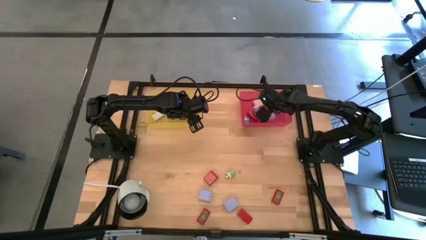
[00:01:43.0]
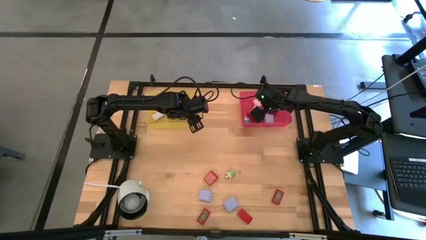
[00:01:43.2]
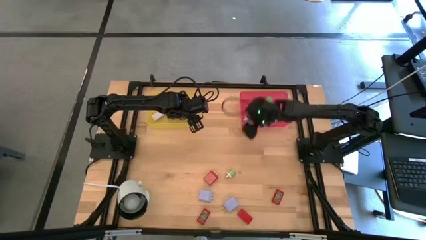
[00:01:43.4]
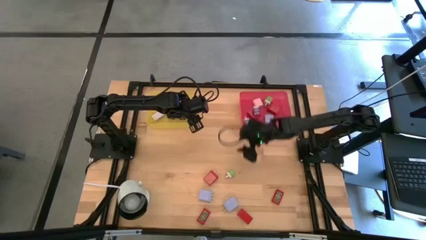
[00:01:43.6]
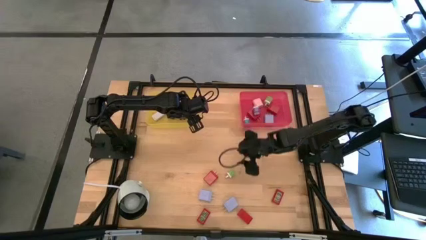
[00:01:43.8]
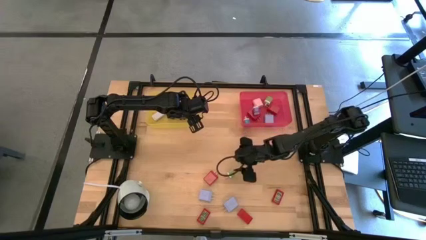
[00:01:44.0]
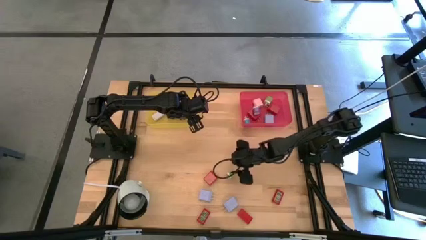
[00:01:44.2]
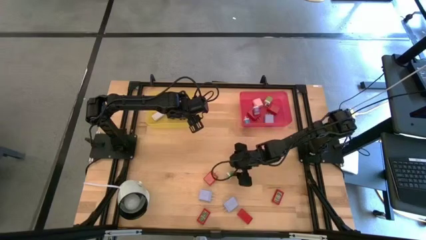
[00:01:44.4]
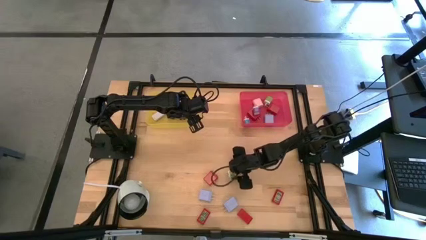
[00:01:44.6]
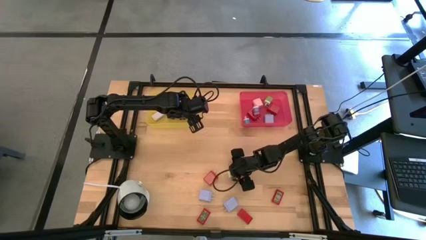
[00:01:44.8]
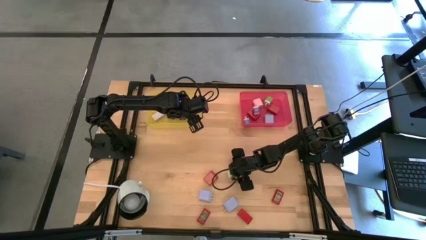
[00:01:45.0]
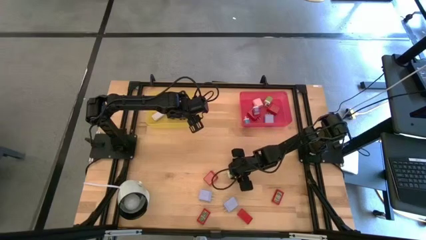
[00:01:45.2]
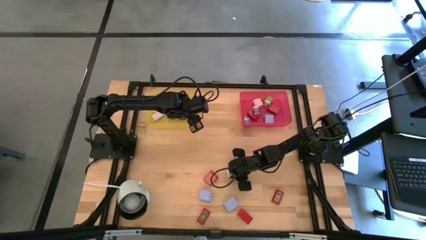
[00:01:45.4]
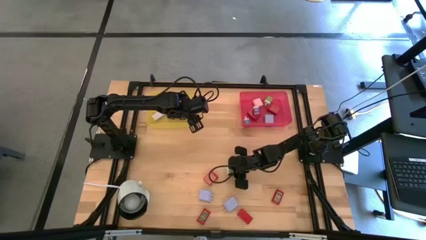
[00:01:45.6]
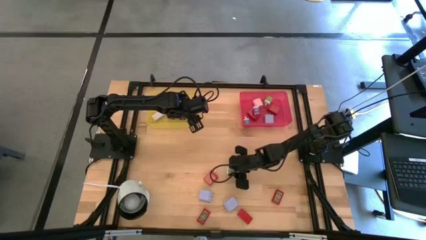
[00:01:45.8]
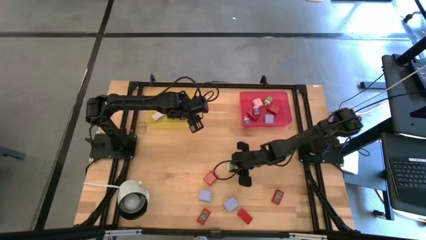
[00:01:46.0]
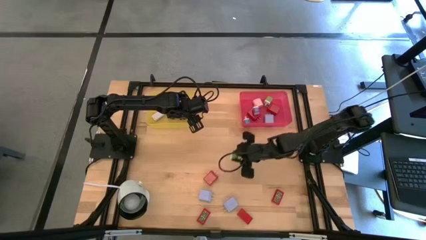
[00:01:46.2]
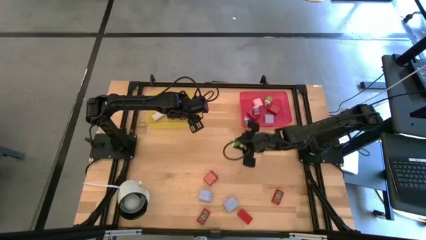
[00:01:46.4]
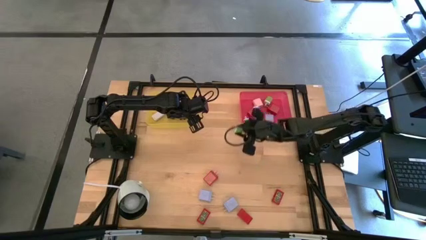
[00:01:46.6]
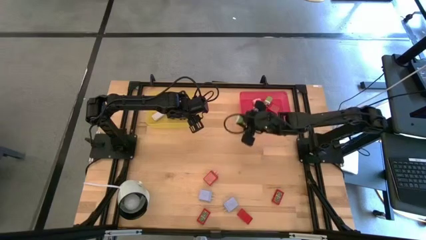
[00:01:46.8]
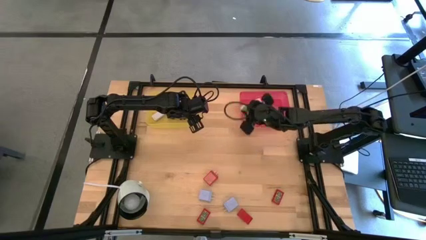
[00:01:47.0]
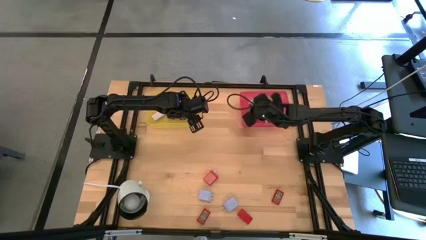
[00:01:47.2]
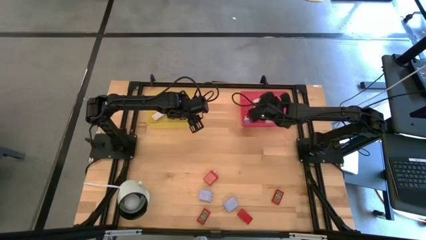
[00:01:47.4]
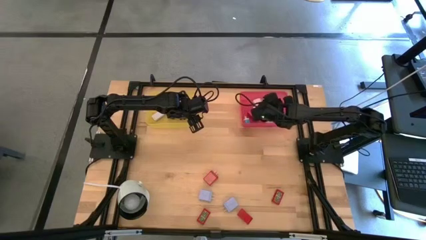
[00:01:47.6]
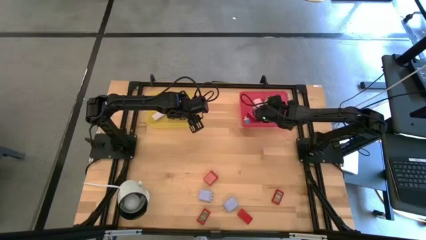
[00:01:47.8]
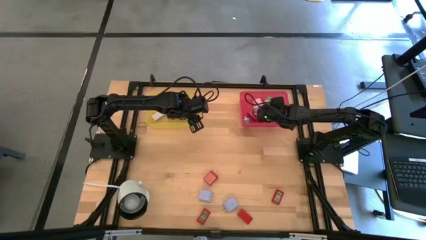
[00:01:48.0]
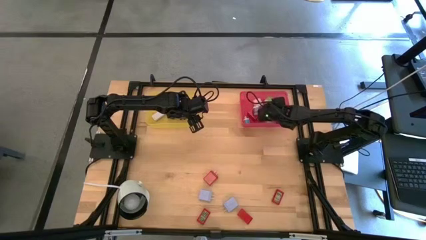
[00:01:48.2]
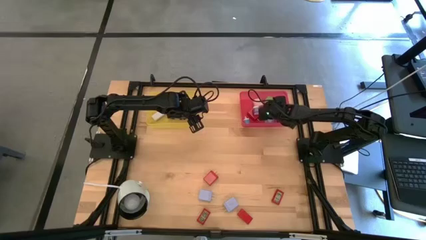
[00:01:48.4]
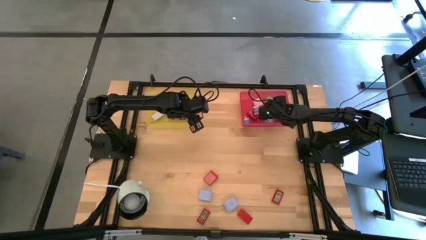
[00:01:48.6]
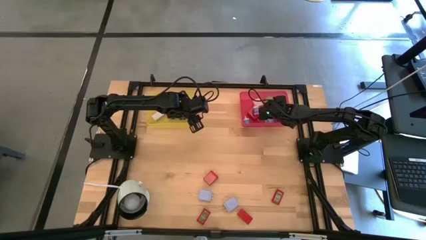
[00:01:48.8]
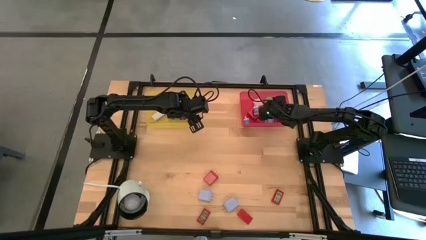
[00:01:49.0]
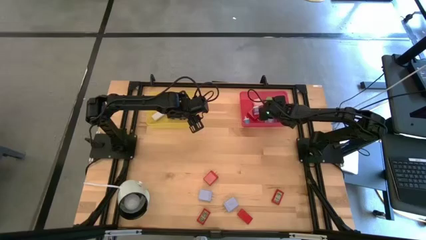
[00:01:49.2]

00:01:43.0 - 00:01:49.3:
Task: Pick & Place Office items
Put the green charger adapter into the red bin

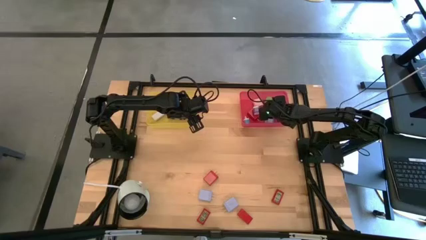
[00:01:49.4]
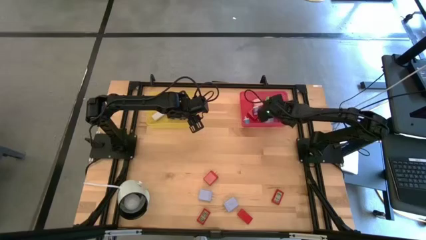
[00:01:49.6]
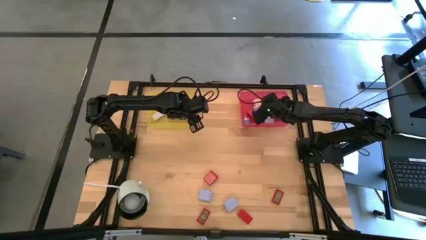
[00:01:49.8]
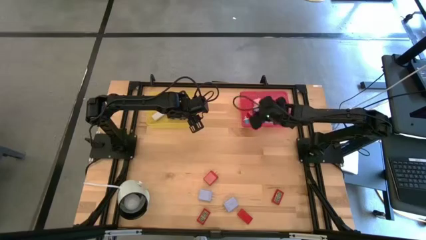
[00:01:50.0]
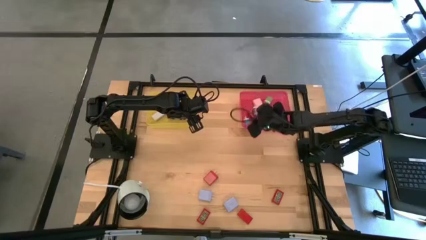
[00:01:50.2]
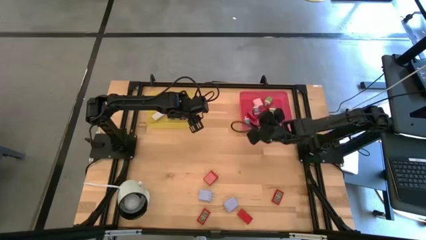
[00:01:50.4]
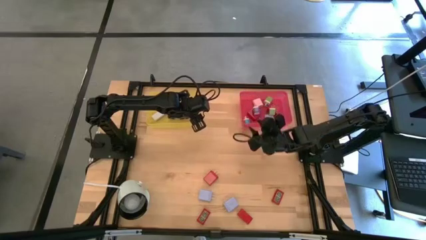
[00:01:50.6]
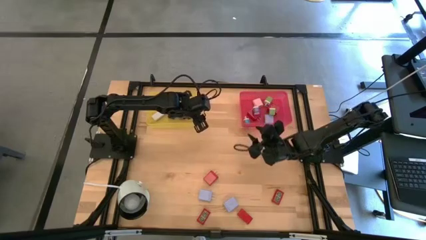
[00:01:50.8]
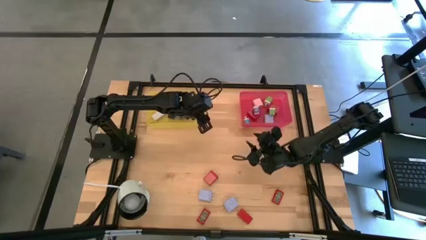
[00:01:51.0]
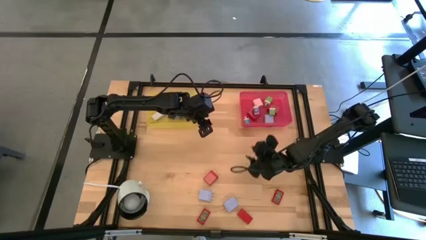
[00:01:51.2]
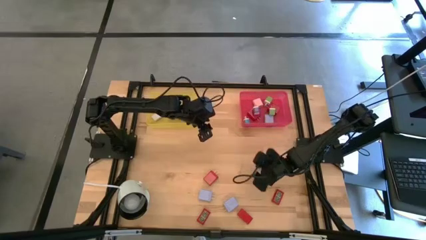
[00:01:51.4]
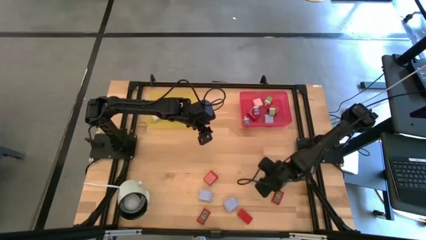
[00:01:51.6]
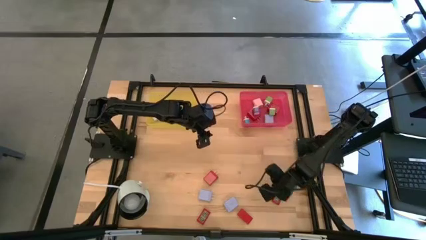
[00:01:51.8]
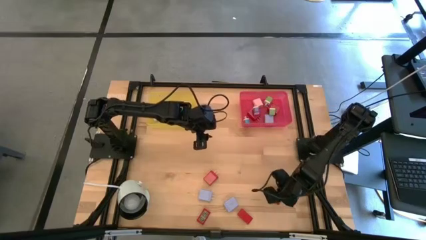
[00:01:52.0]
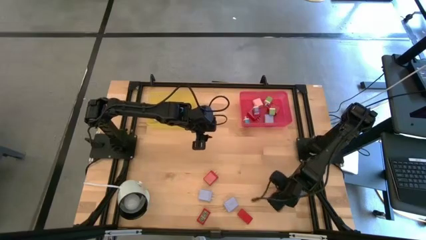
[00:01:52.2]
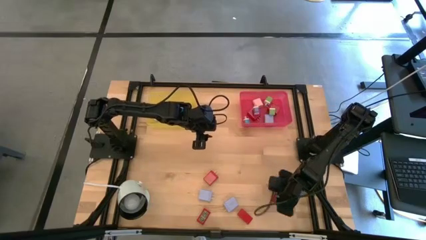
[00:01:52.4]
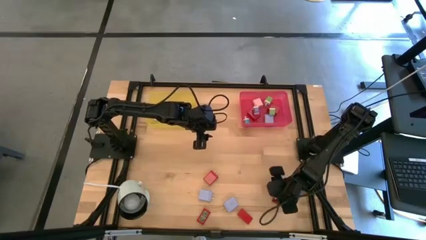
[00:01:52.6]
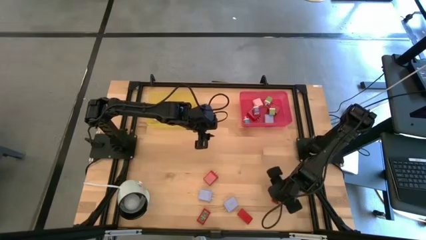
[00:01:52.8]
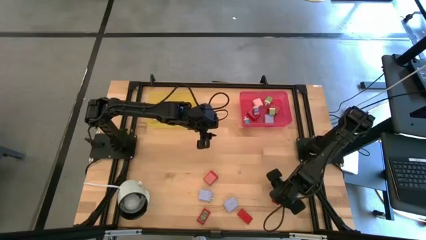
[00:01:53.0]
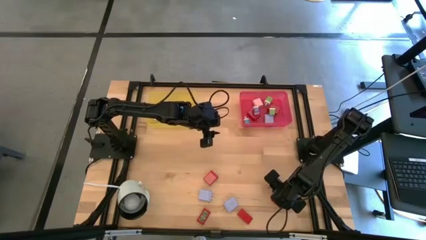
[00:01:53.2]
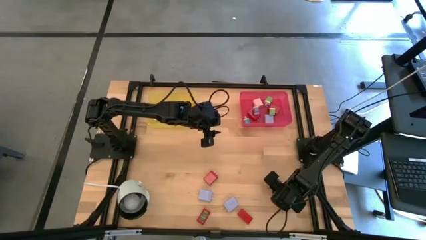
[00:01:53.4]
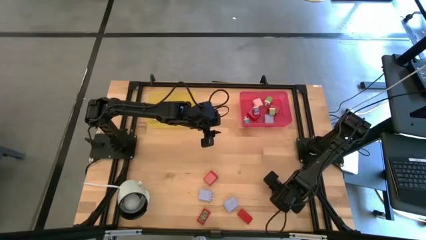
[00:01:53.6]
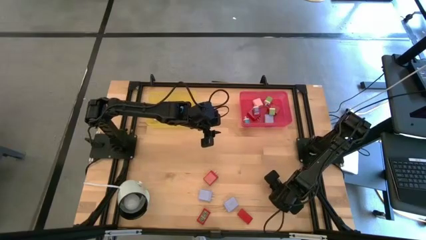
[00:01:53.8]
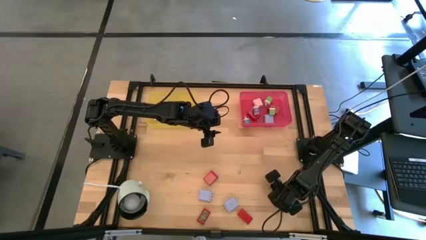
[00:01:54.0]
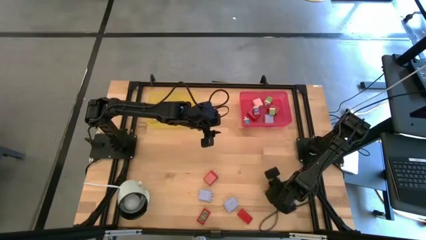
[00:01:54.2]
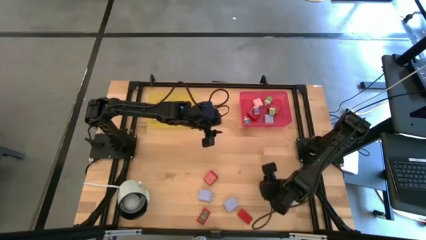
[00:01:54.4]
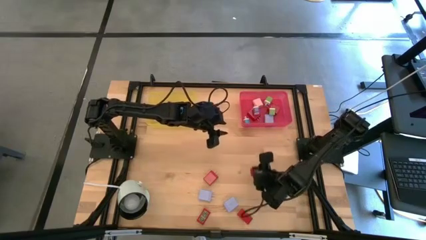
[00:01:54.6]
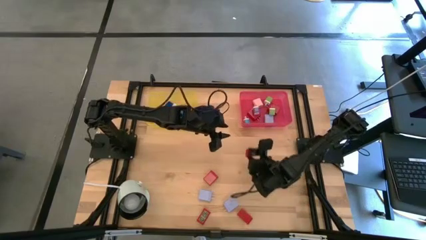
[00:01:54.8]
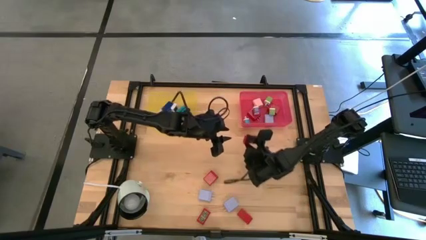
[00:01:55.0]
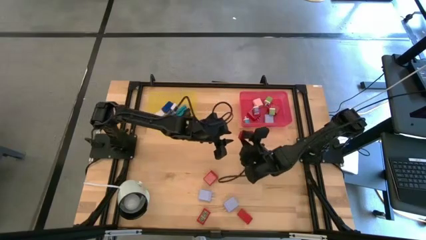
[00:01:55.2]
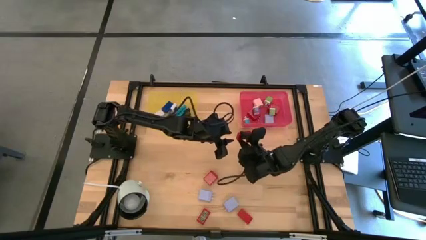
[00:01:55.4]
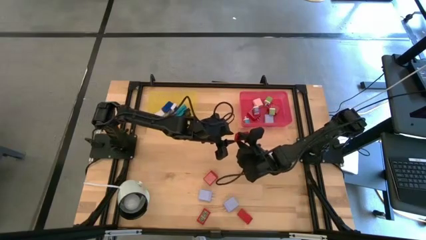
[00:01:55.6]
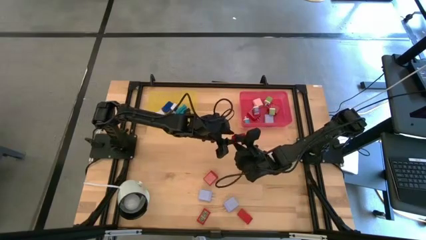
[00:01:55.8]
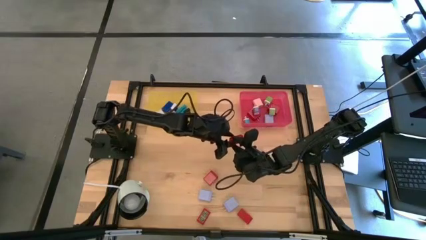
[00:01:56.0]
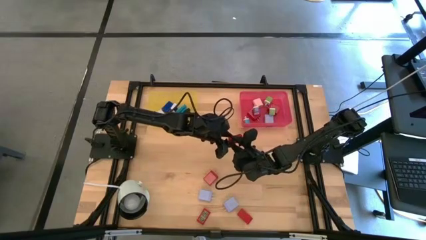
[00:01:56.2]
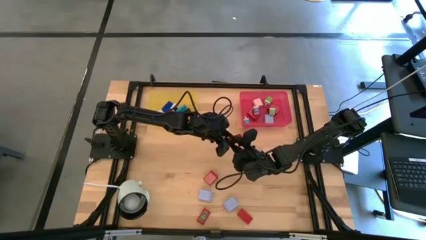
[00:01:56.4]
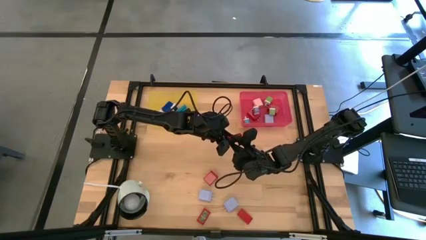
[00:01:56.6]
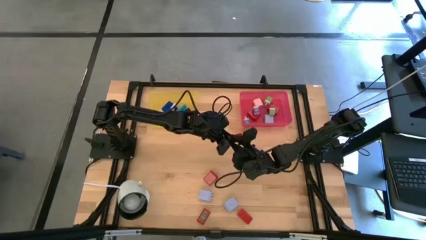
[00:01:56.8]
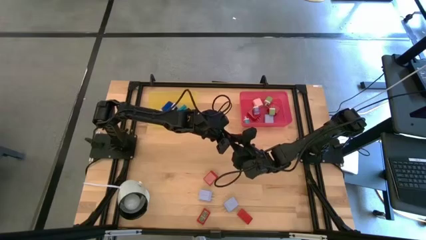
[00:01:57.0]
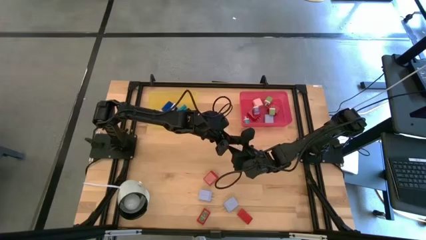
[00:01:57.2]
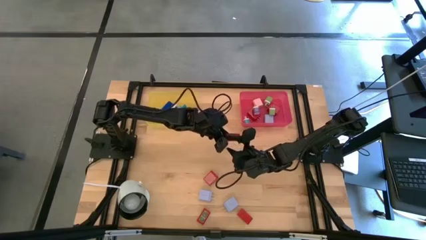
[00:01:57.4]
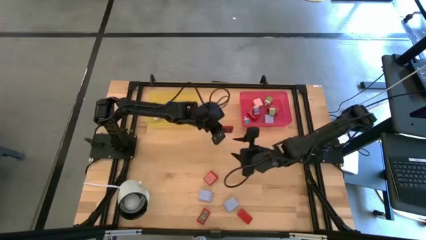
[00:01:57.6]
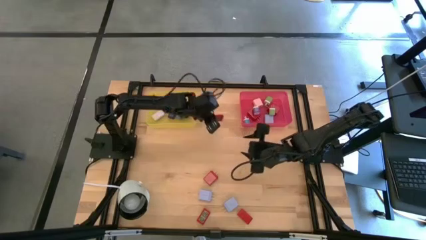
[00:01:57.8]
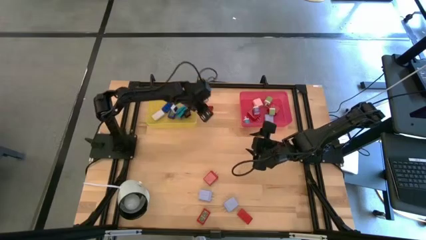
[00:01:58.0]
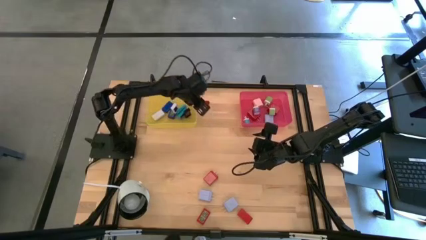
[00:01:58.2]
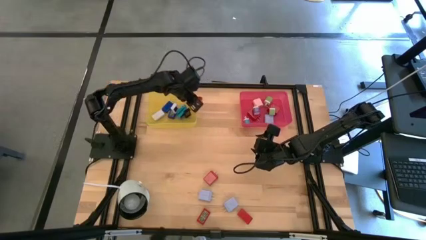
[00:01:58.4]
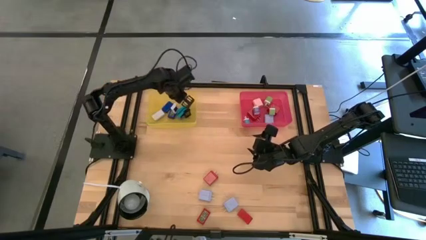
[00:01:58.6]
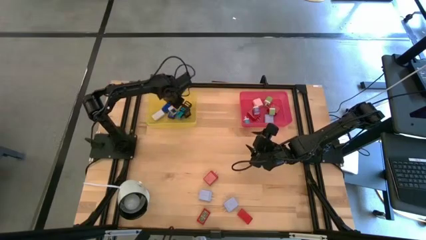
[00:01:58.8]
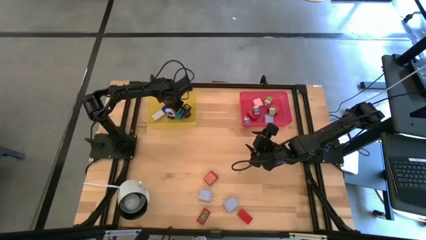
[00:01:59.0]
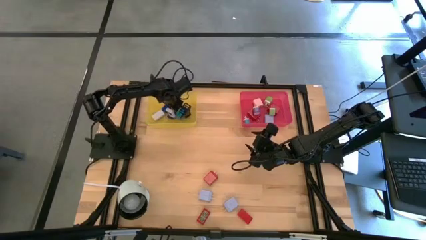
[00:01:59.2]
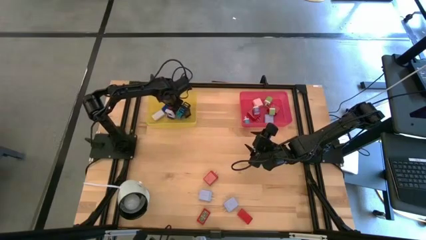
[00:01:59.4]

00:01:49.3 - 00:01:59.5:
Put the left red digital clock into the yellow bin
